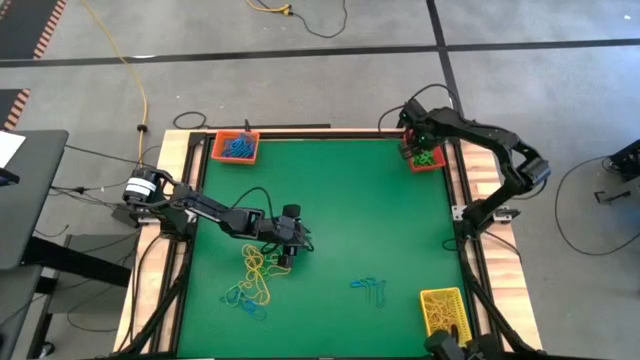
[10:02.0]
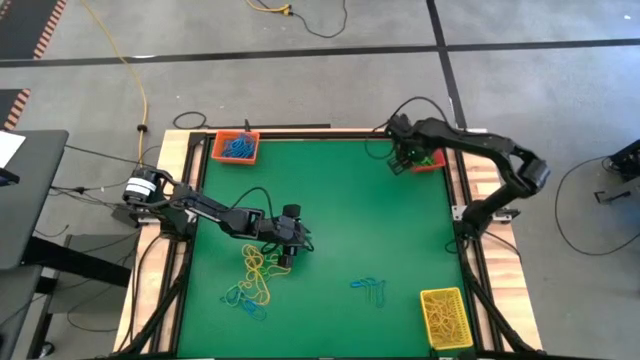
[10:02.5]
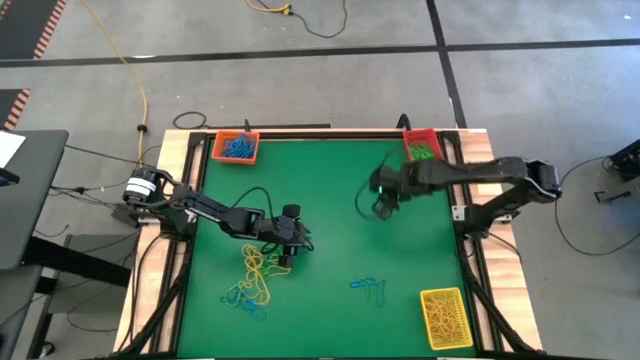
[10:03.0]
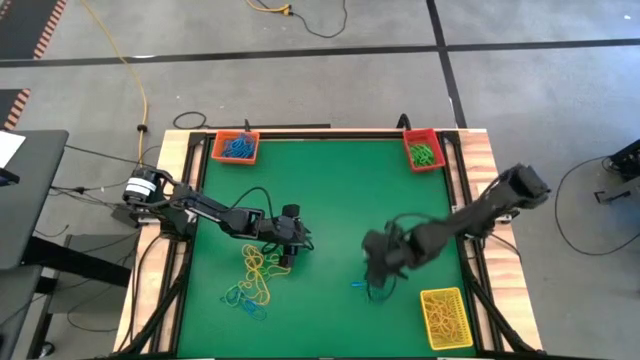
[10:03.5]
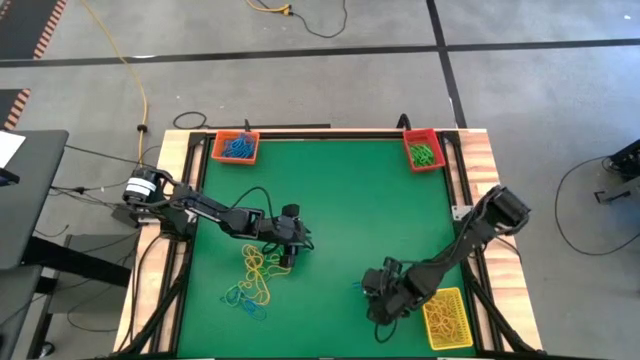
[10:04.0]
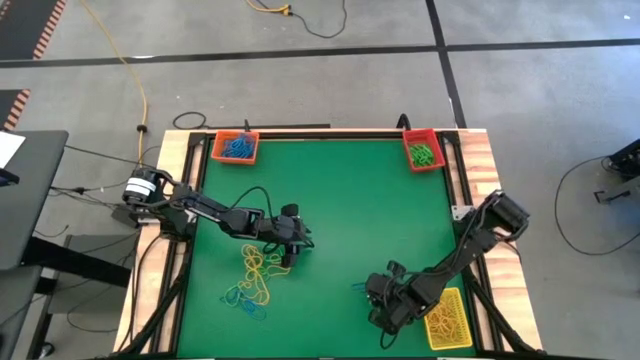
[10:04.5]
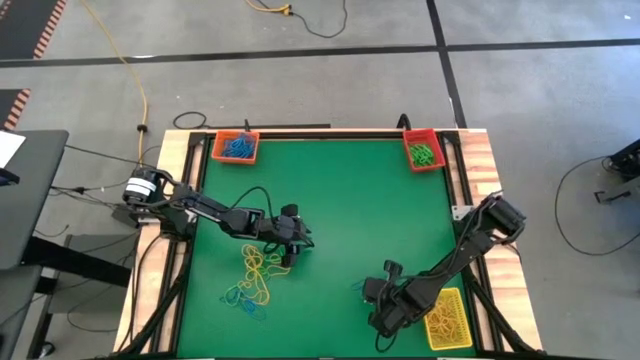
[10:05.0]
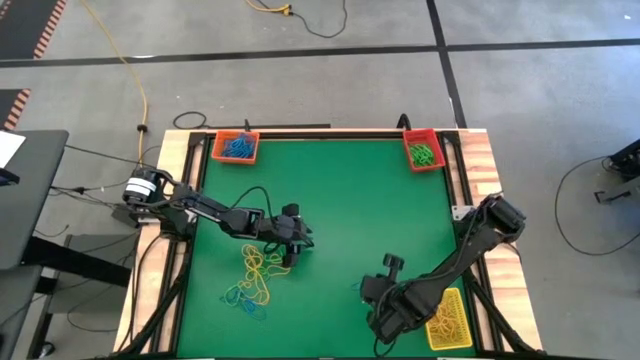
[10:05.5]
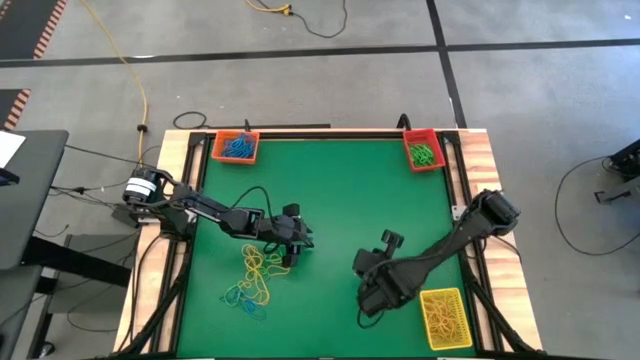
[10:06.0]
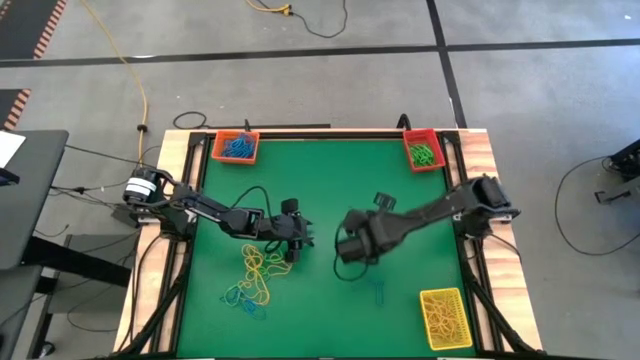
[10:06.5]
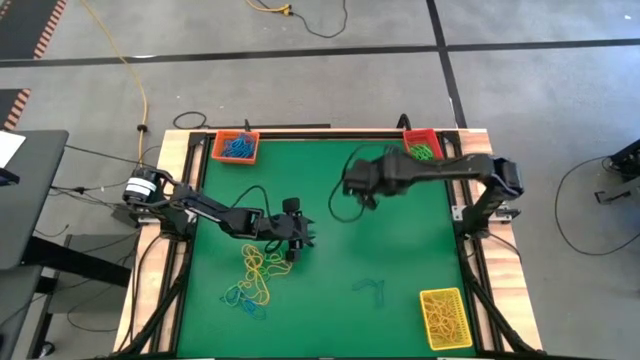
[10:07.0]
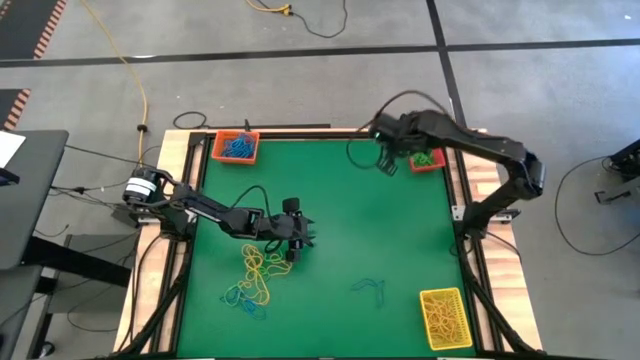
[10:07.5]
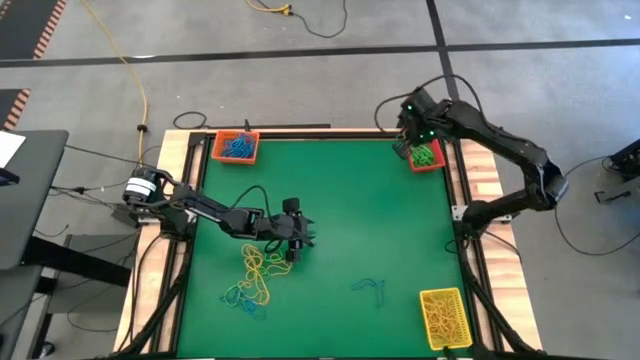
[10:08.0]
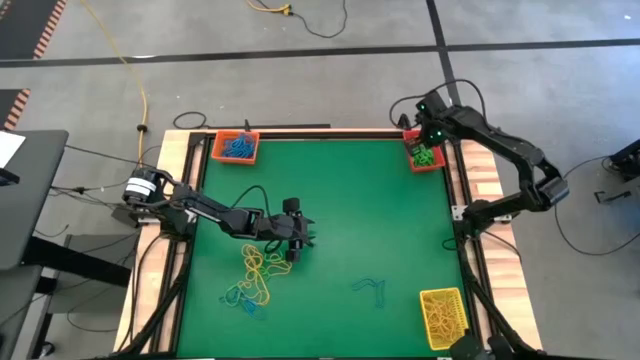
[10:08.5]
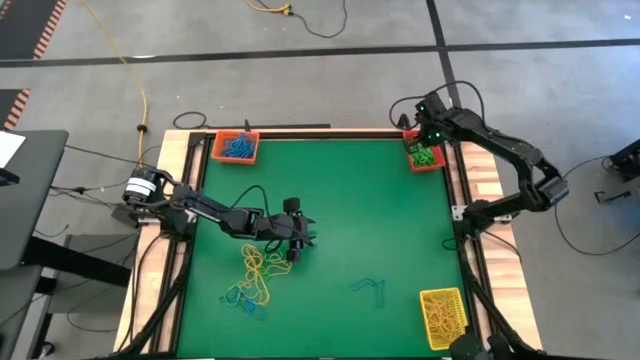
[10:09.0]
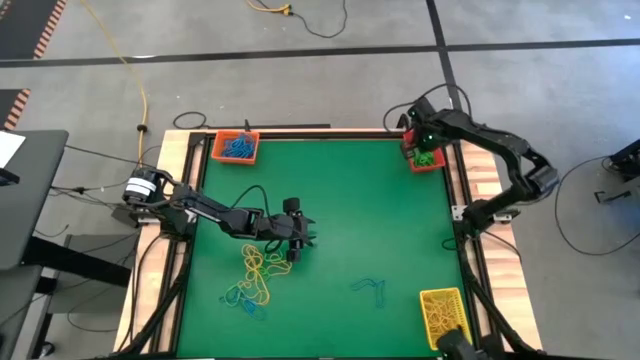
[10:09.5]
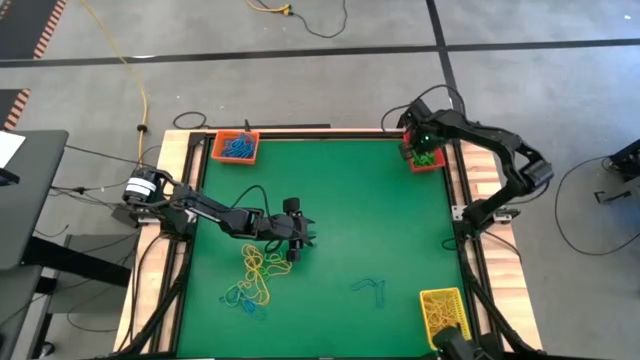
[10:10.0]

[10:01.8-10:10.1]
Task: Sort rubber bands into baskets
Put the right green rubber band into the red bin

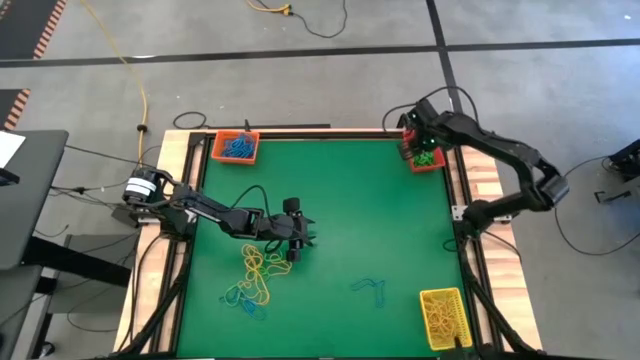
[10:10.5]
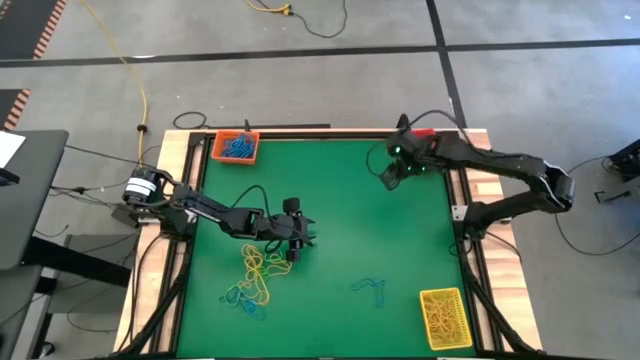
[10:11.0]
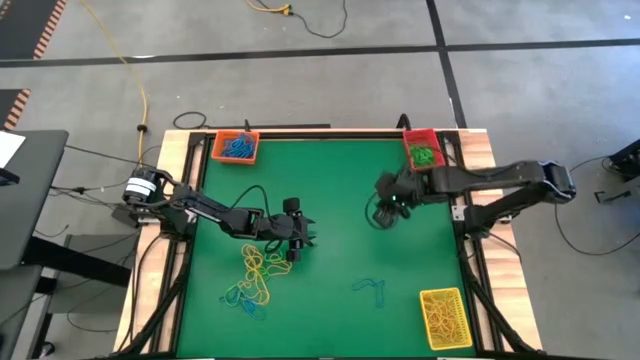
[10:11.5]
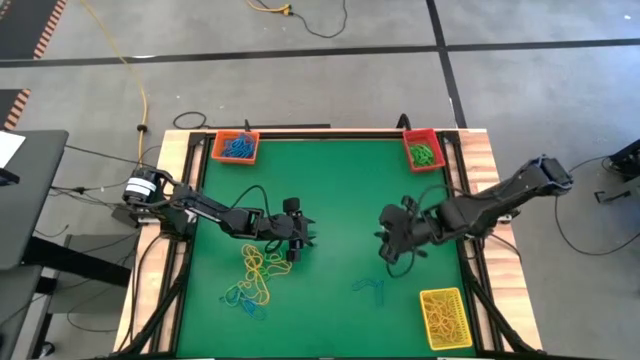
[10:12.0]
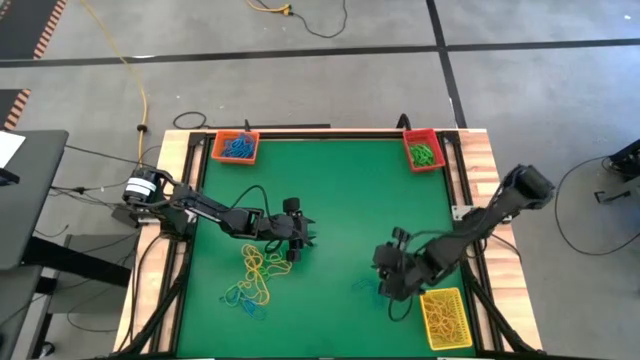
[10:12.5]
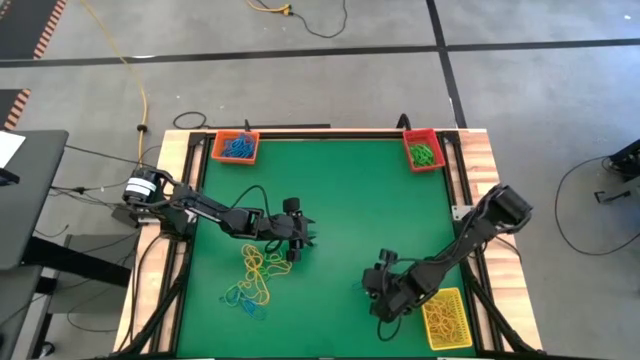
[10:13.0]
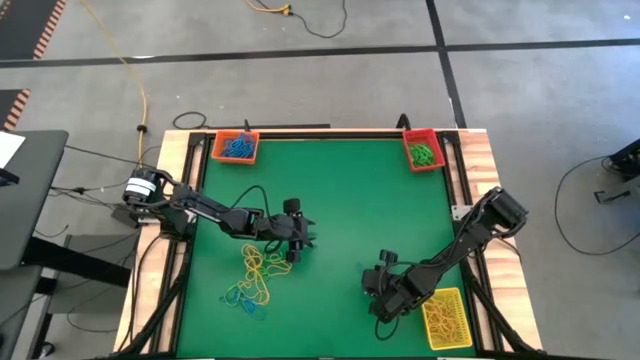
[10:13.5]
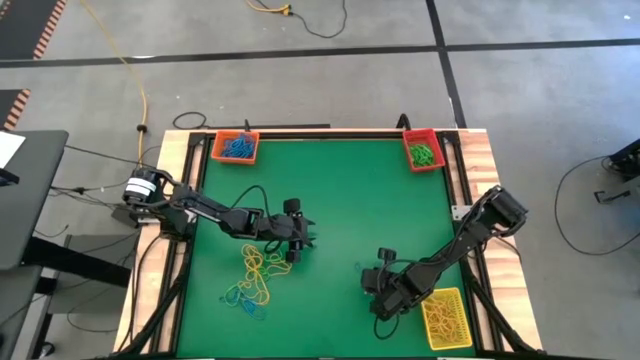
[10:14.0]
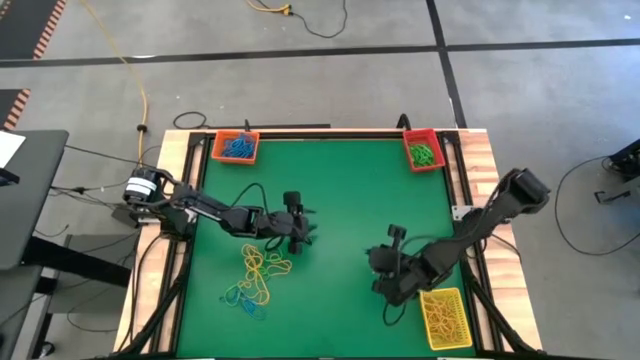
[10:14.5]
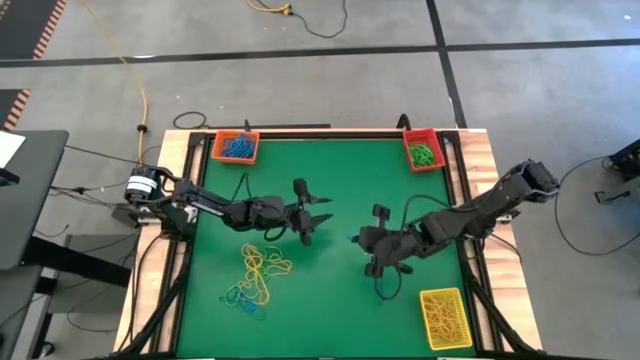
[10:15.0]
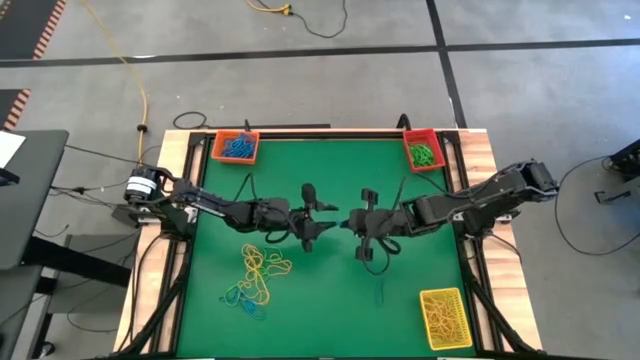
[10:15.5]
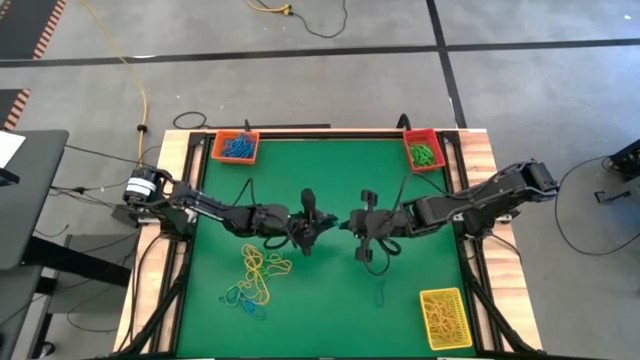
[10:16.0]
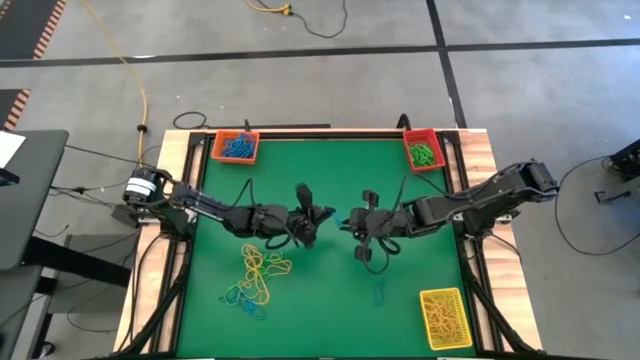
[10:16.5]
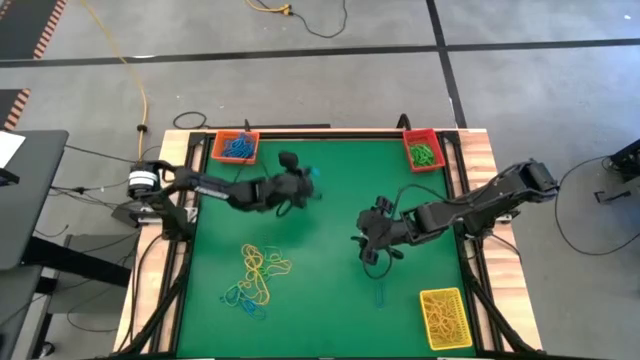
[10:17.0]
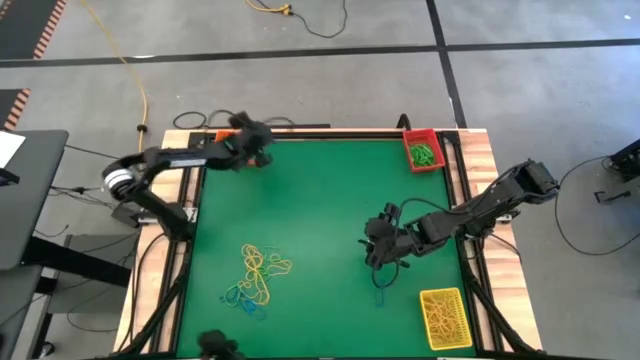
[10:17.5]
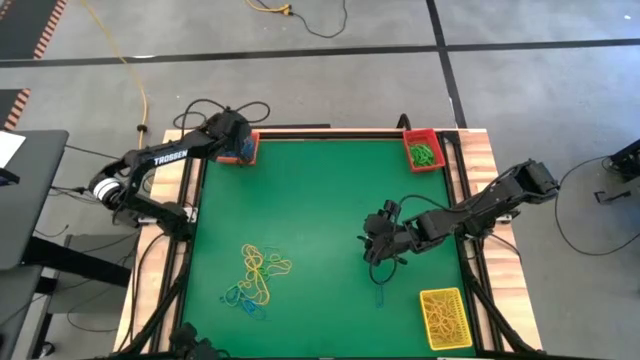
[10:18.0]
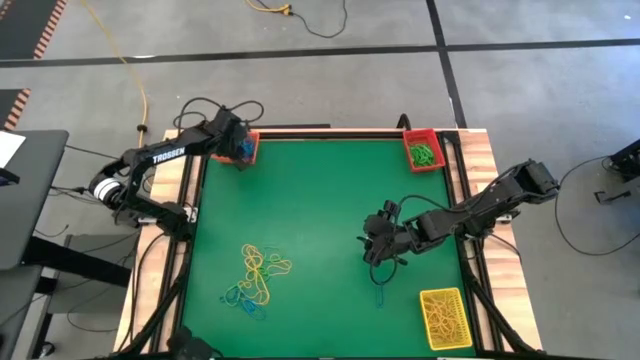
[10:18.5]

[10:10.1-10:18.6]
Put the right blue rubber band into the orange bin

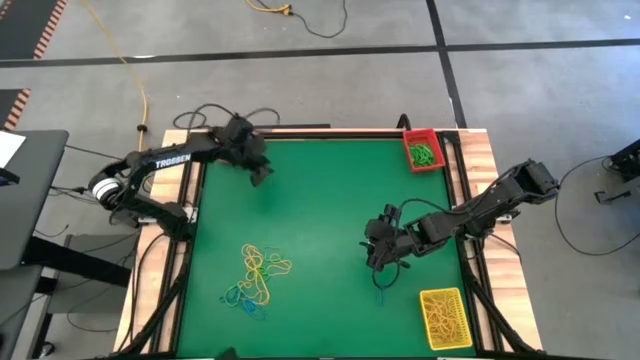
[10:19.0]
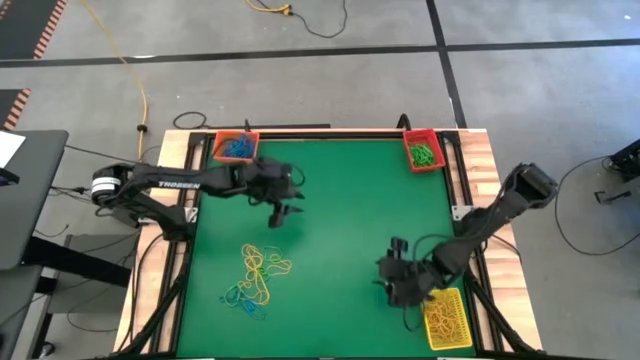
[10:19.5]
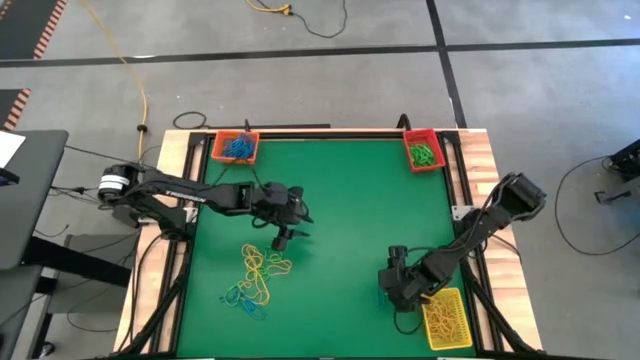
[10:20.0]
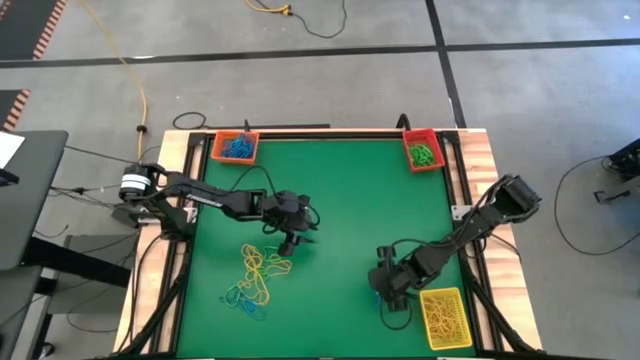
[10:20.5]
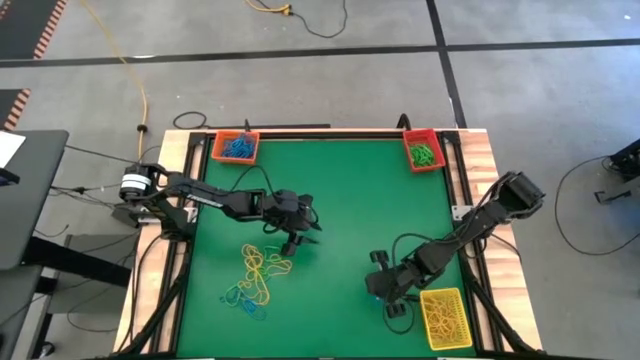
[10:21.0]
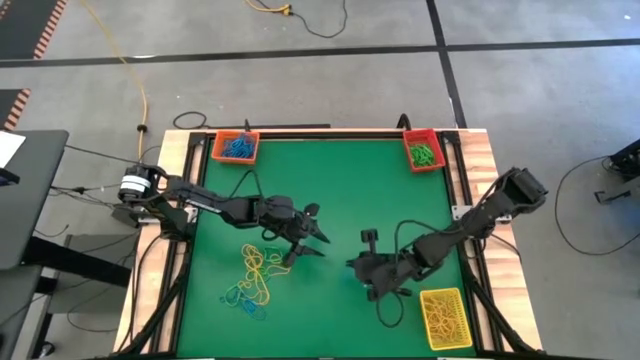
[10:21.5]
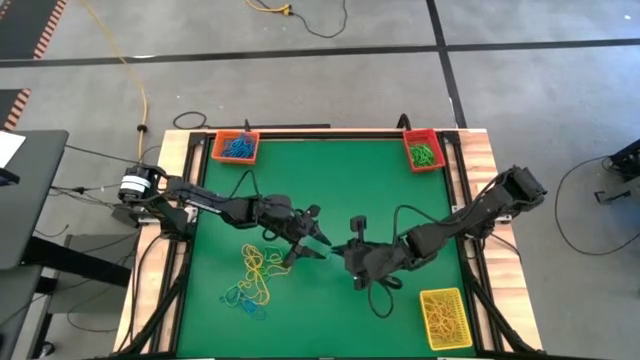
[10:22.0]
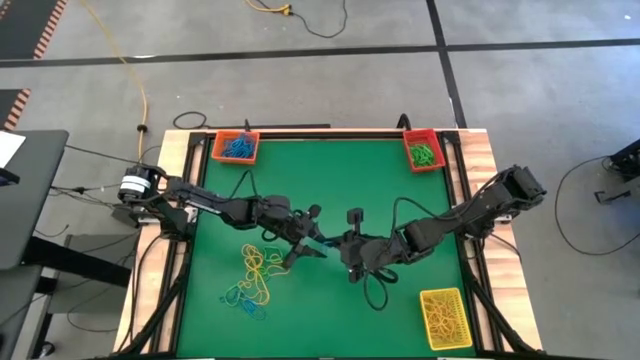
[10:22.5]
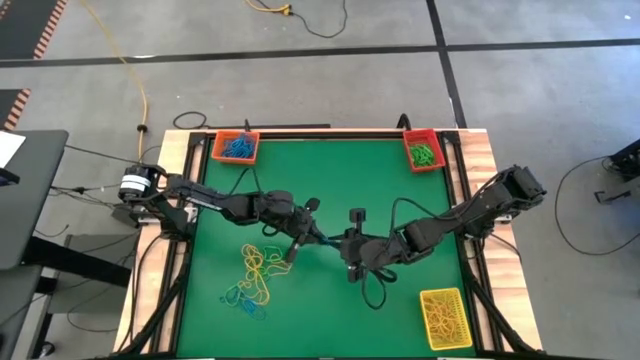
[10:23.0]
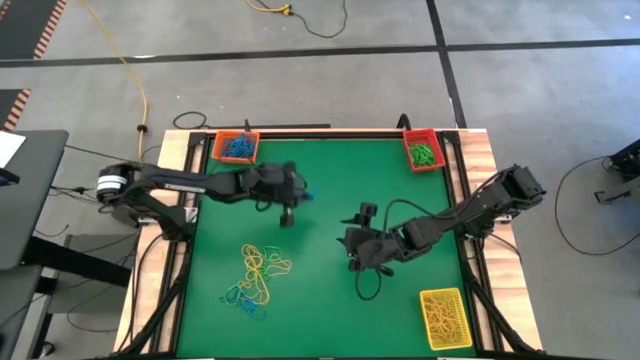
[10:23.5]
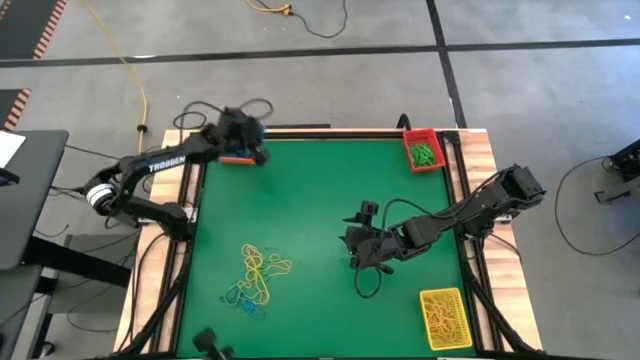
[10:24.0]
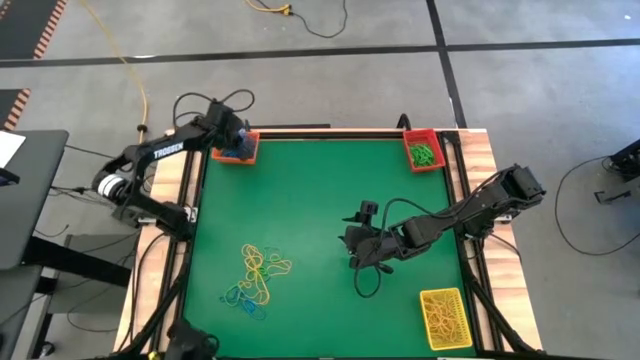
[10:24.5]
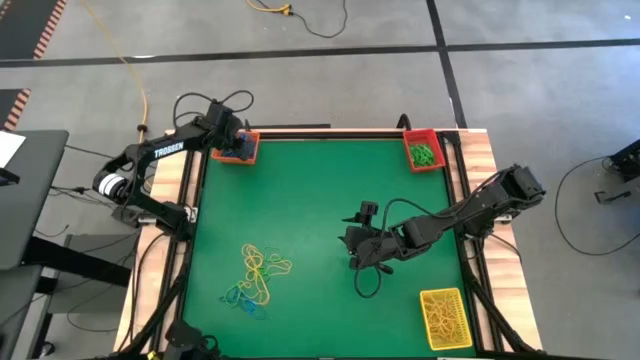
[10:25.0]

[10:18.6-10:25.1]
Put the right blue rubber band into the orange bin
